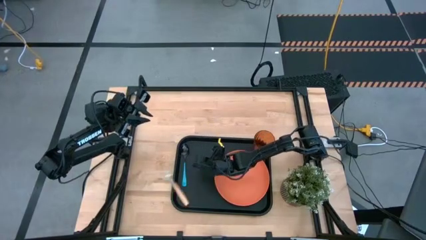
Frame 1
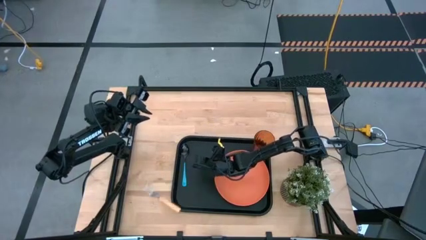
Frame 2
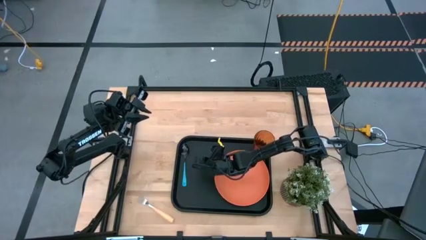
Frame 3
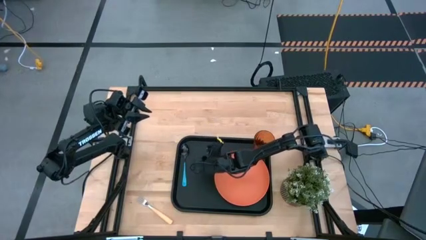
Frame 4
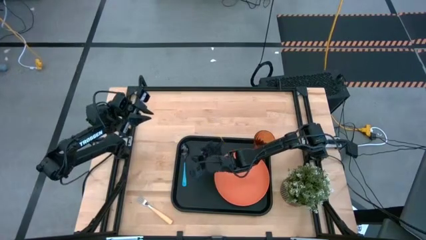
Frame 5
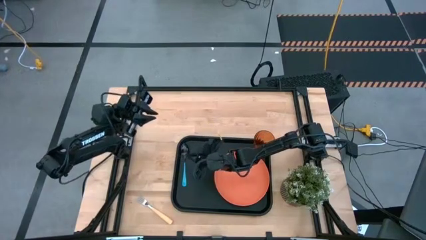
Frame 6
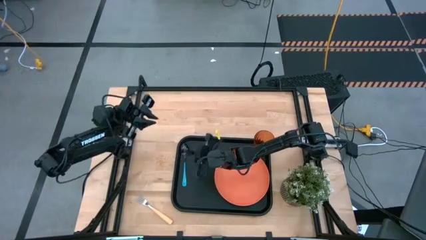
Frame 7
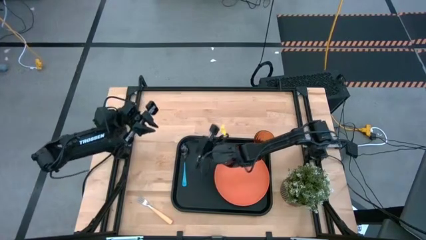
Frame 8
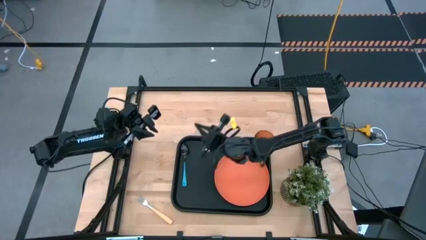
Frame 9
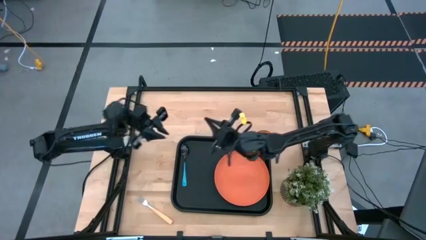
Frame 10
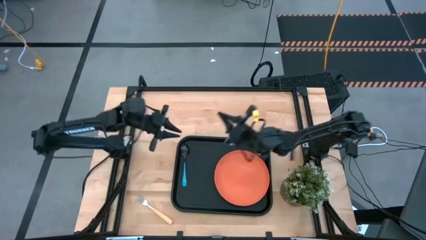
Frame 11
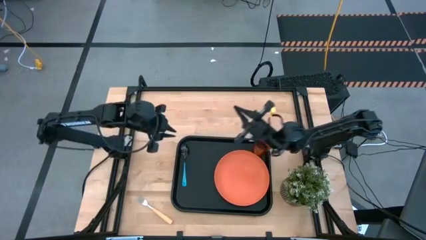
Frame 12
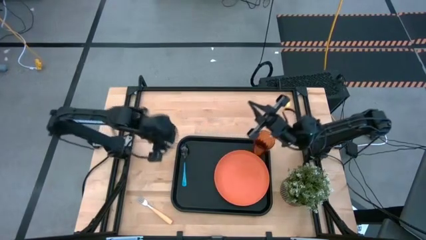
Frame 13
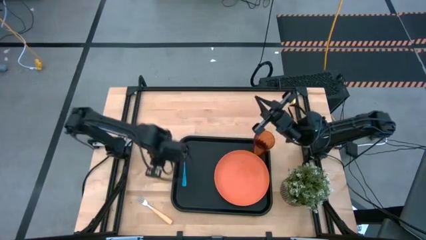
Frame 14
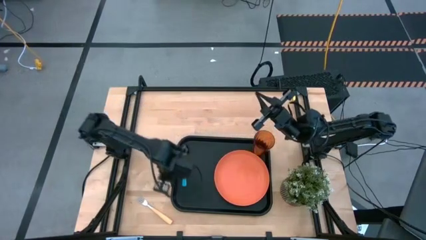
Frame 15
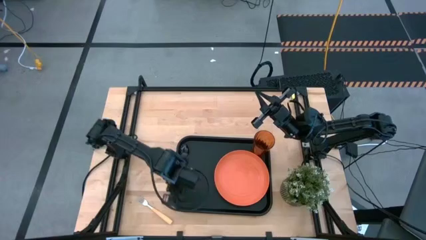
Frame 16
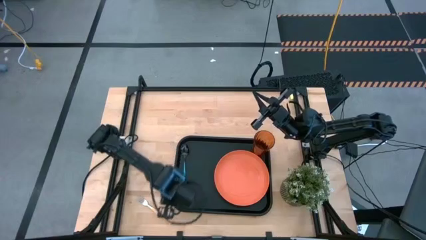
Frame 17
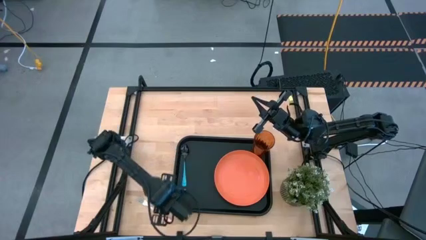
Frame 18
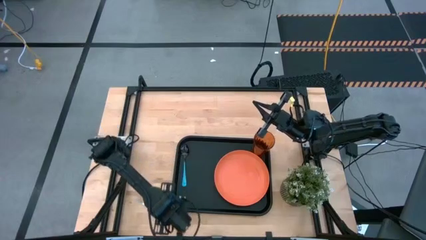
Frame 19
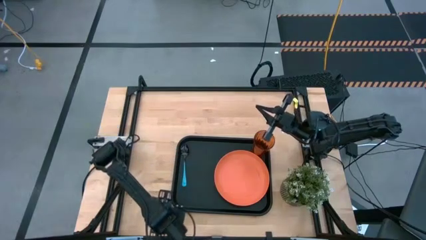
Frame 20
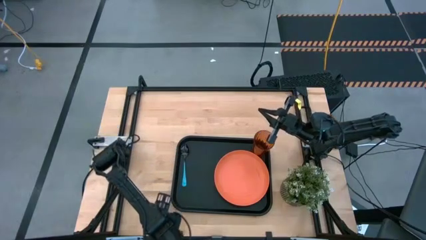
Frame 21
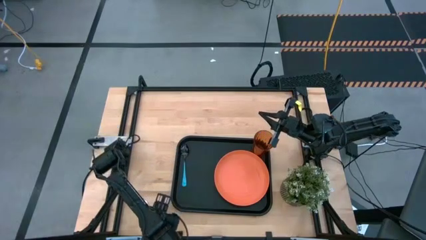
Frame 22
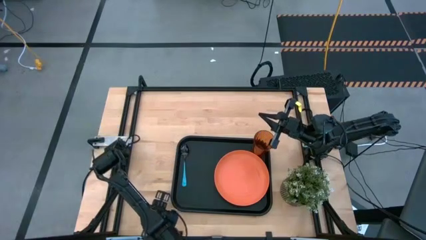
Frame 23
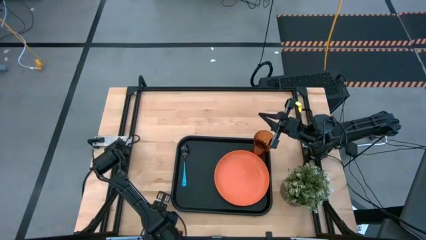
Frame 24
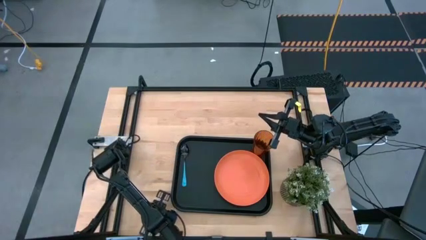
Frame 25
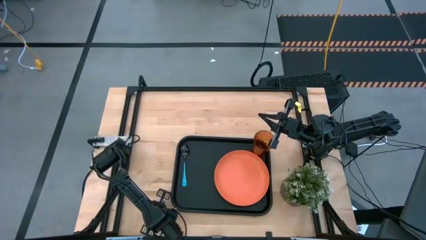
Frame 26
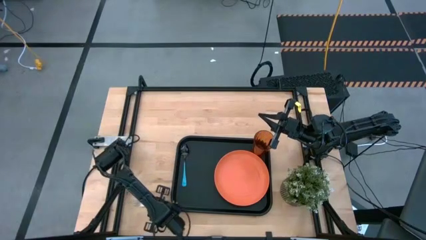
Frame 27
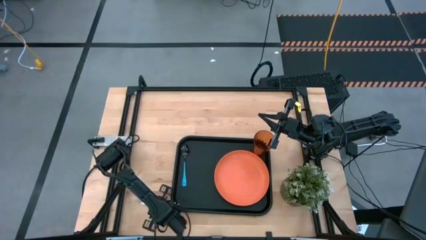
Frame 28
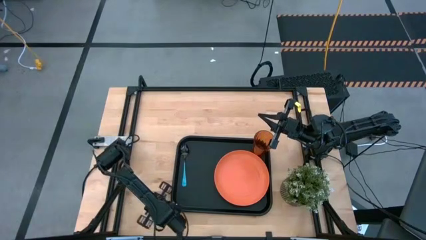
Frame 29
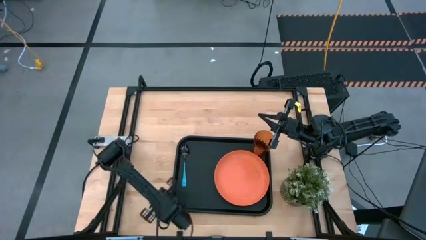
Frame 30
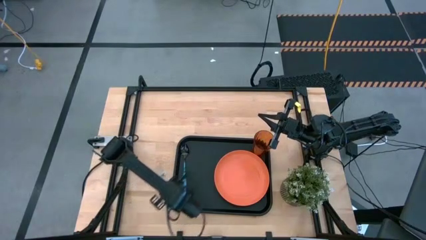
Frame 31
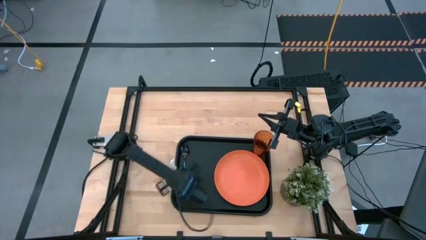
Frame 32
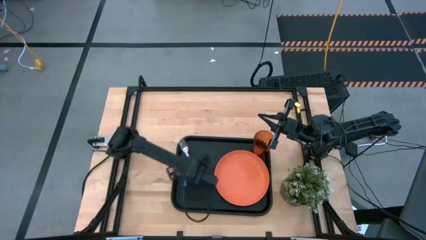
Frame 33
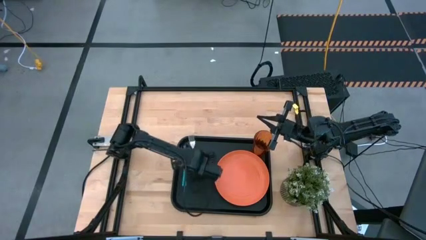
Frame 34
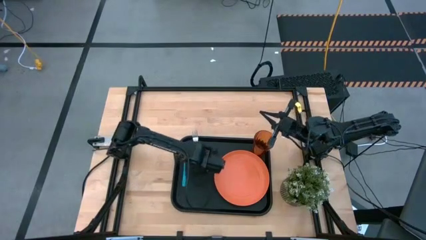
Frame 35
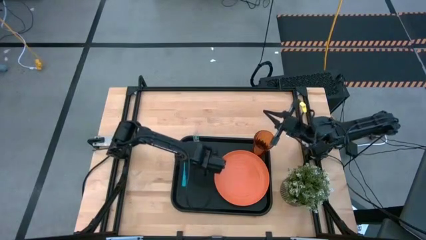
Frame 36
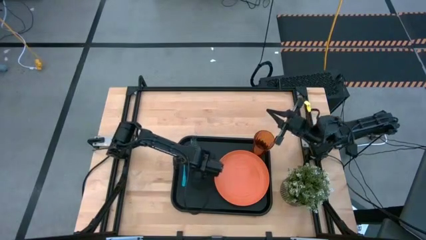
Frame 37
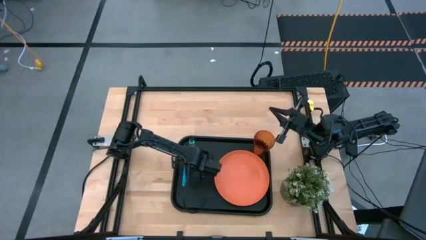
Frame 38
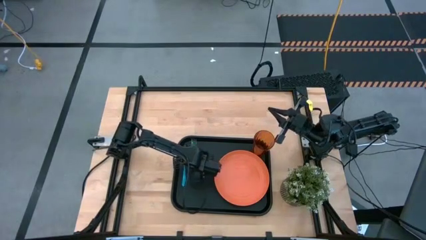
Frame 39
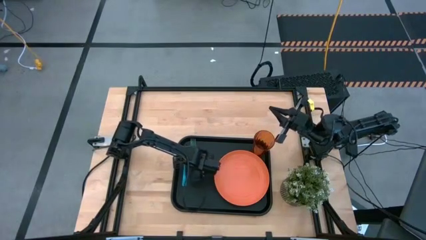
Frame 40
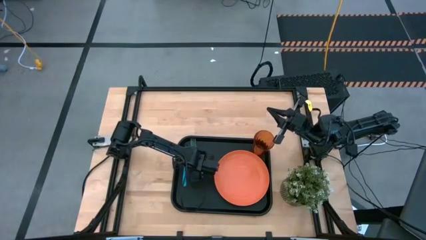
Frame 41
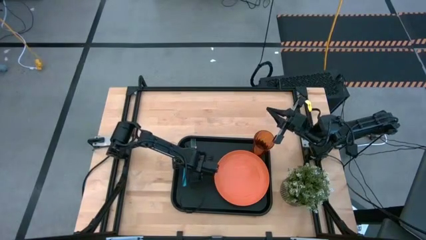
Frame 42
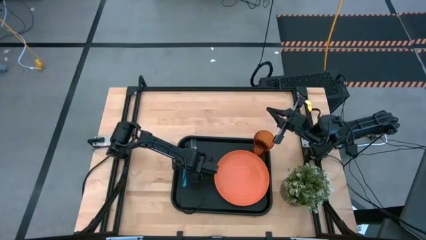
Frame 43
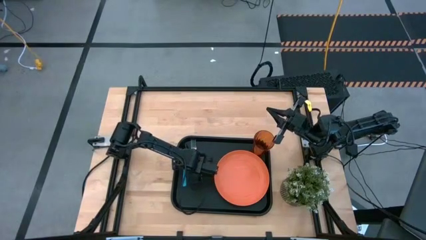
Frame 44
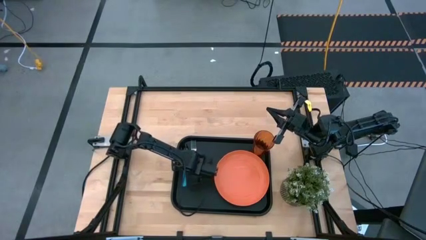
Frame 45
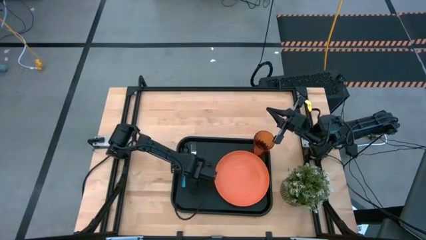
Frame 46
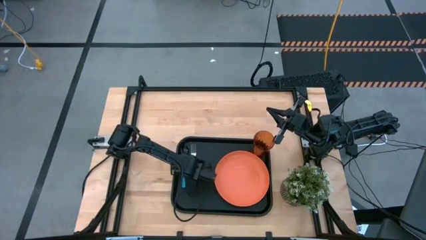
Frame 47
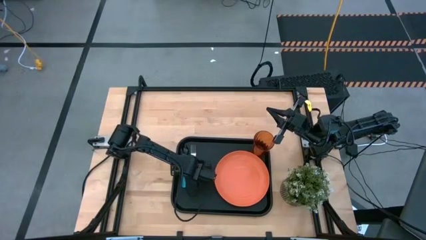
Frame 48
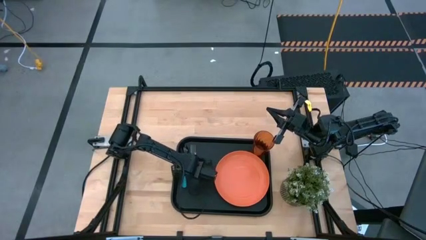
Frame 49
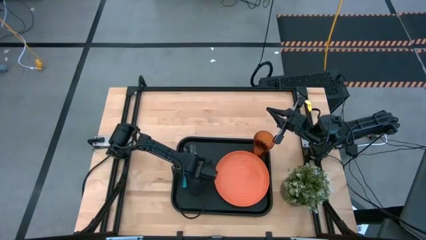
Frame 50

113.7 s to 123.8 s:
Task: Pick and place plate/cup/fork/spoon on tray
Put the pink fork on the black serving tray

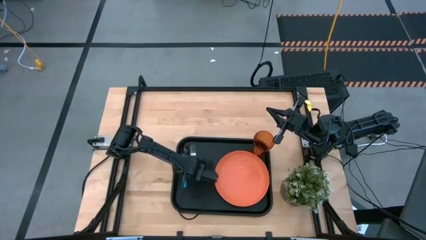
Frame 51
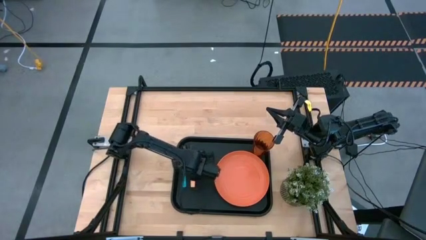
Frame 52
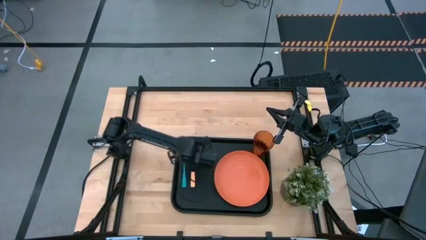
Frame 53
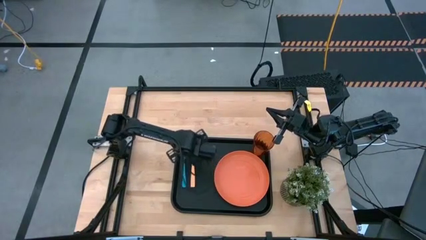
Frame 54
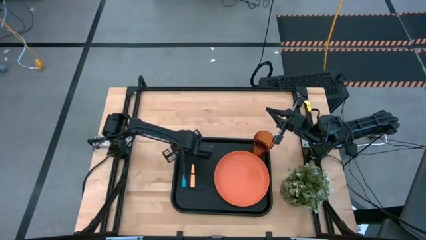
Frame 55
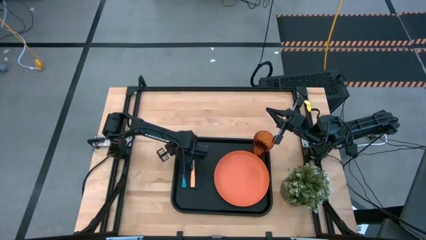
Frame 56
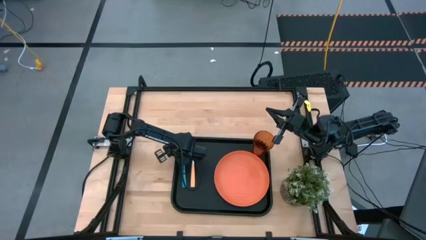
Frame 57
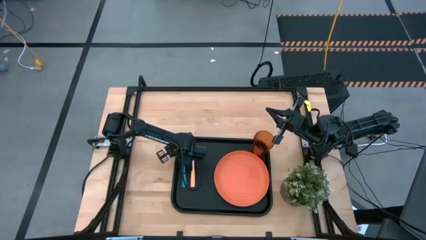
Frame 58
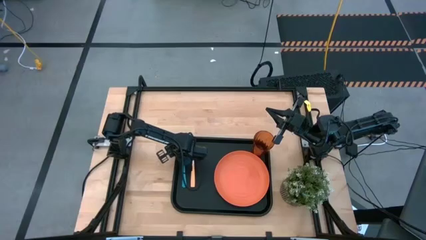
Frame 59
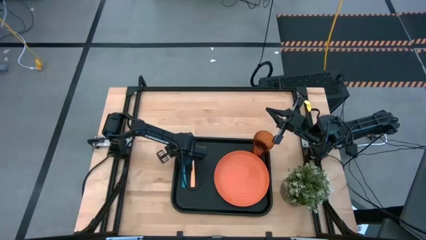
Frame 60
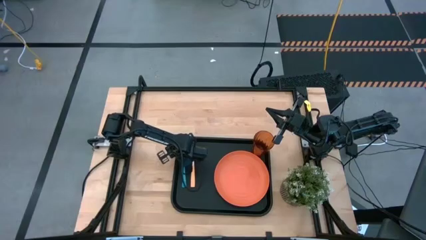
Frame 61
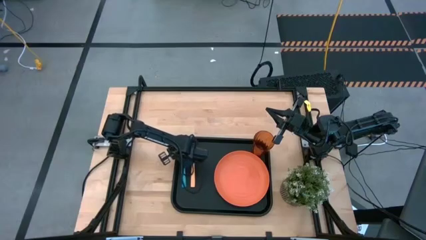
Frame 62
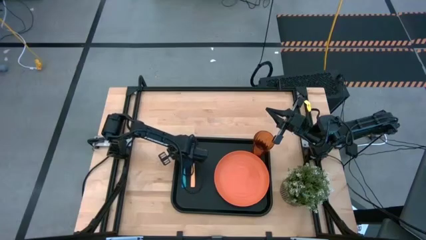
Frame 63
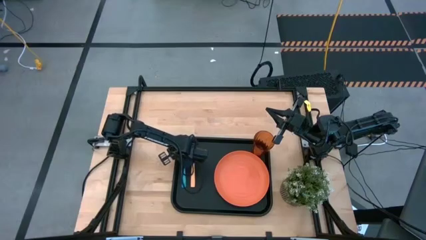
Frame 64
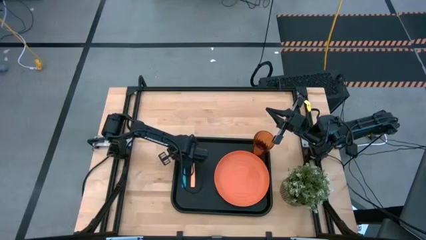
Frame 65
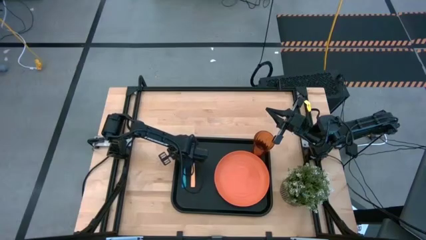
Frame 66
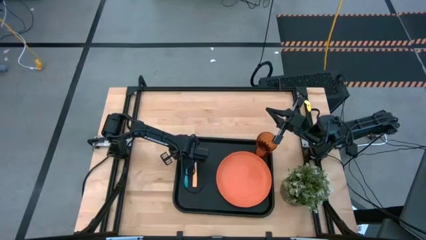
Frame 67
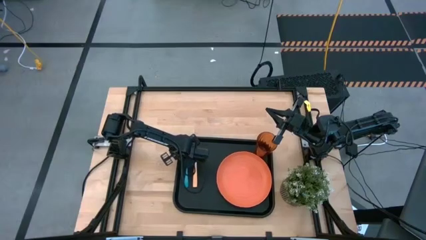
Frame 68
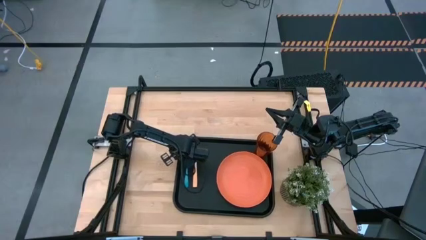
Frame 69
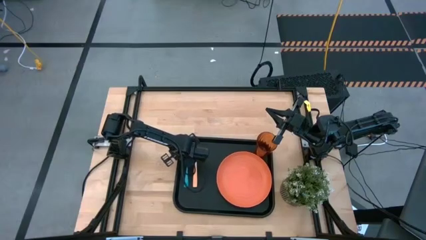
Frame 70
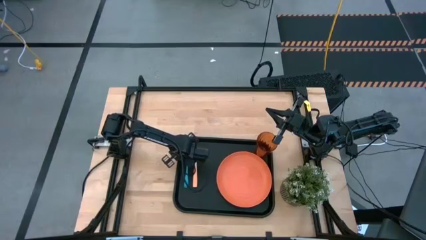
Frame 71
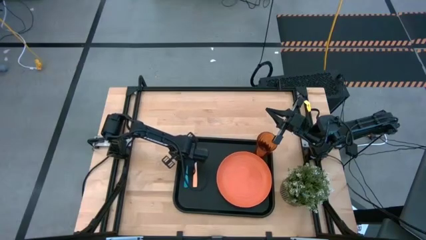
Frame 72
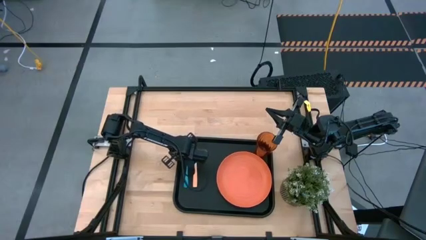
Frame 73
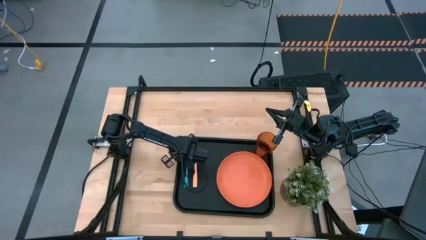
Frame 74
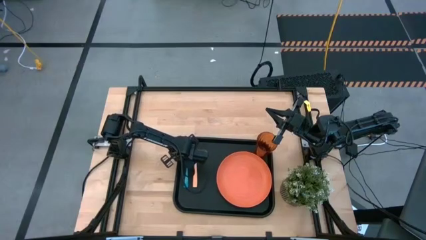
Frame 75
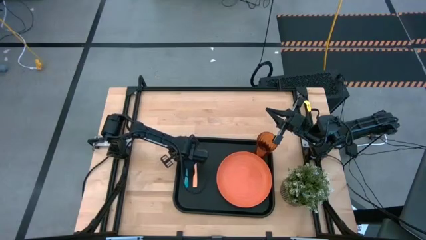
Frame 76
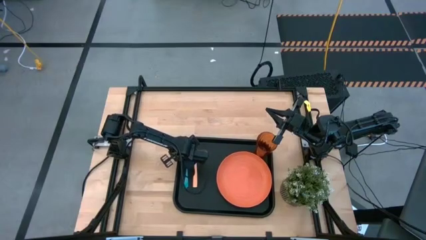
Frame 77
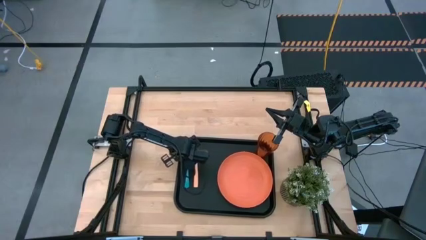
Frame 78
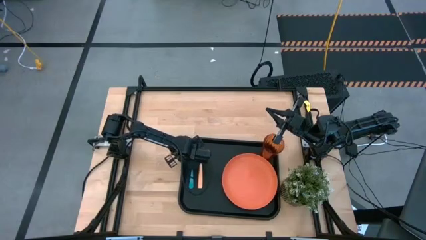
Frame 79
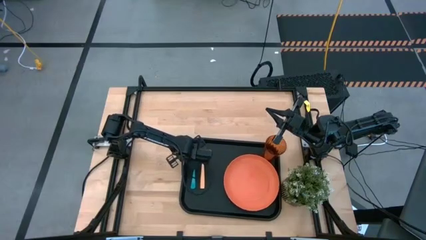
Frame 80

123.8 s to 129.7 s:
Adjust the black serving tray
